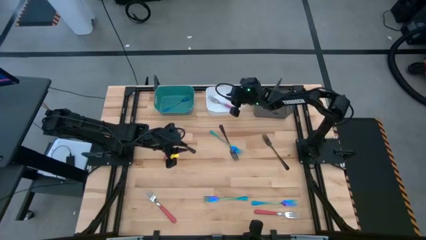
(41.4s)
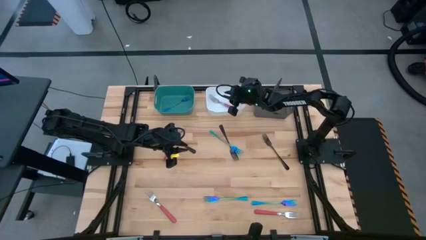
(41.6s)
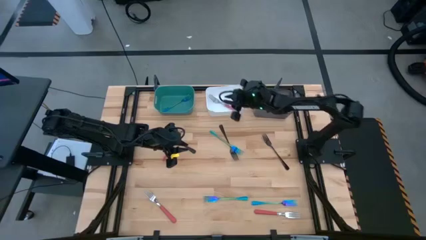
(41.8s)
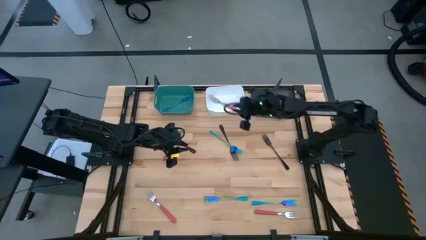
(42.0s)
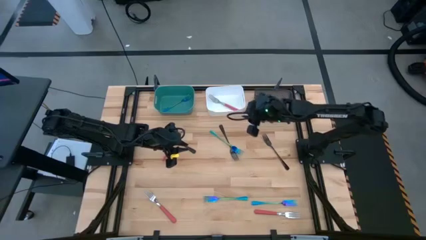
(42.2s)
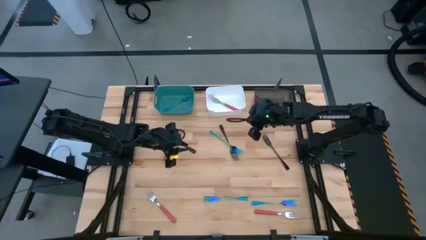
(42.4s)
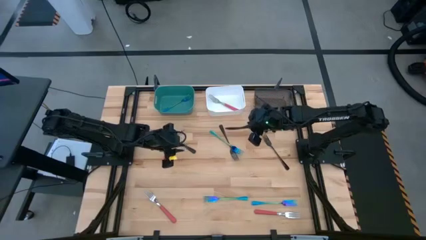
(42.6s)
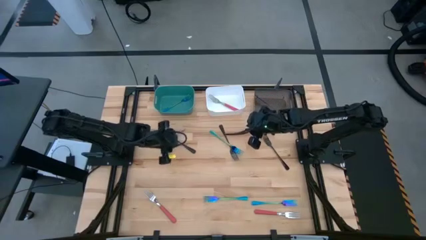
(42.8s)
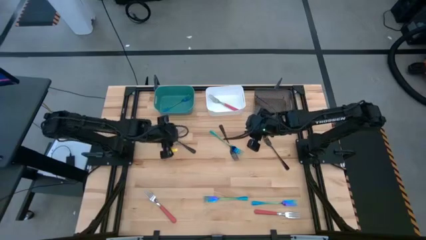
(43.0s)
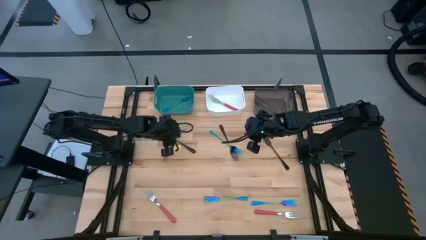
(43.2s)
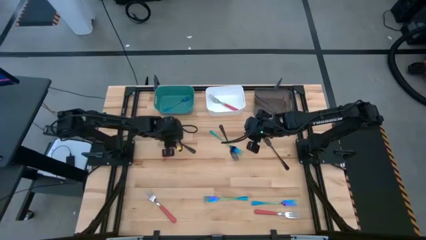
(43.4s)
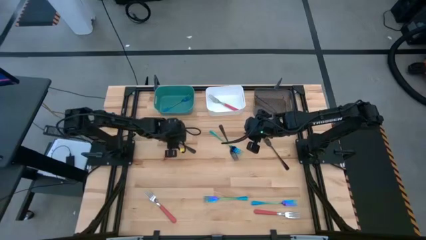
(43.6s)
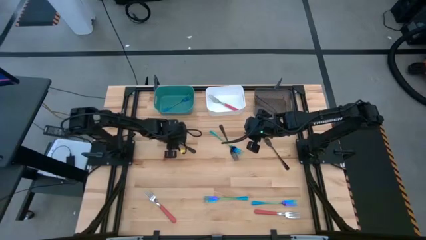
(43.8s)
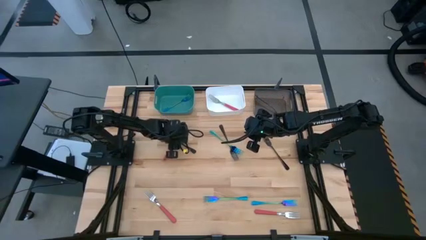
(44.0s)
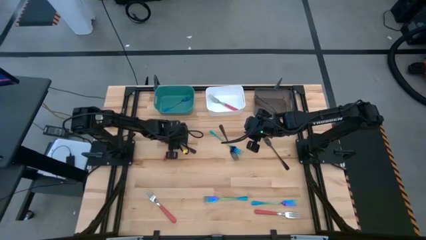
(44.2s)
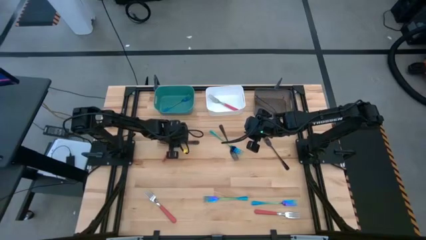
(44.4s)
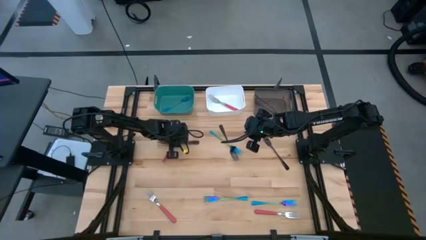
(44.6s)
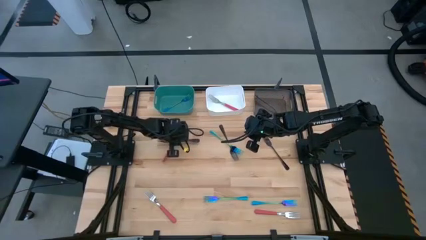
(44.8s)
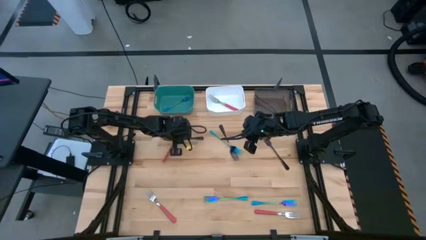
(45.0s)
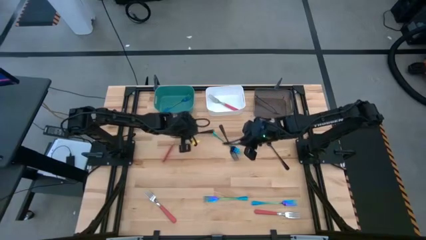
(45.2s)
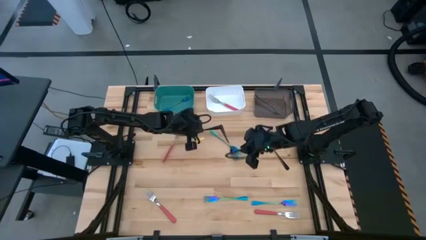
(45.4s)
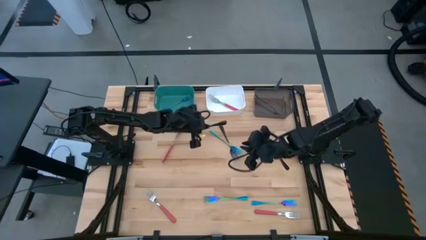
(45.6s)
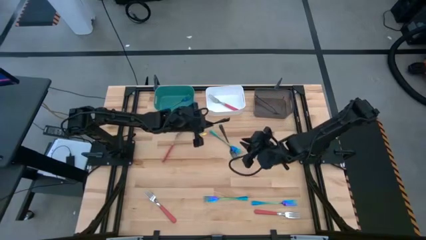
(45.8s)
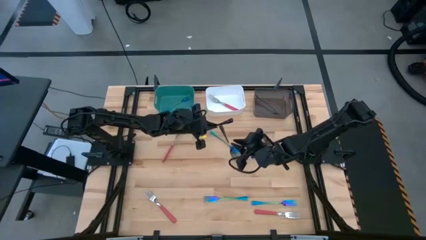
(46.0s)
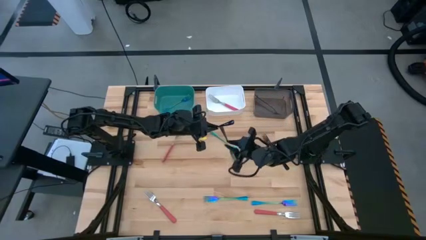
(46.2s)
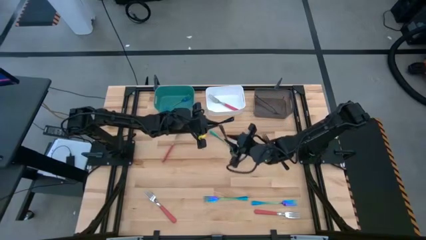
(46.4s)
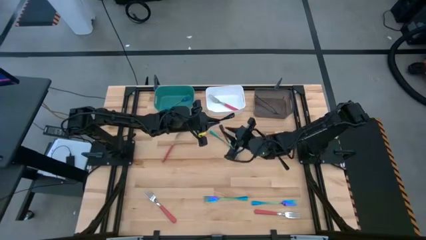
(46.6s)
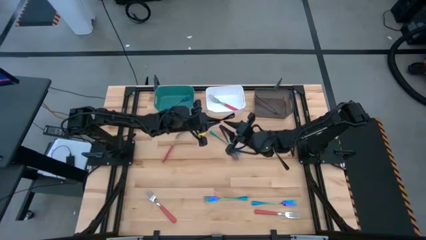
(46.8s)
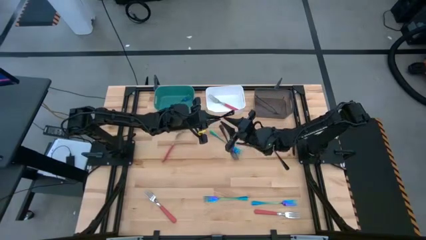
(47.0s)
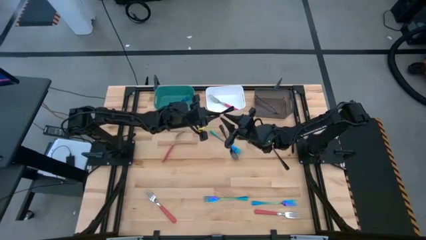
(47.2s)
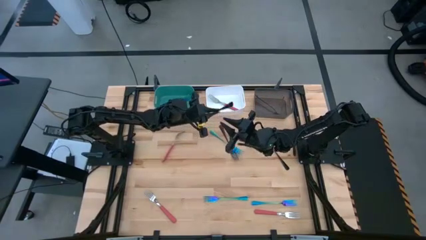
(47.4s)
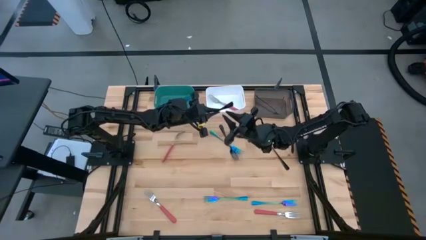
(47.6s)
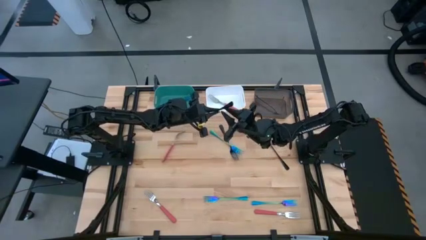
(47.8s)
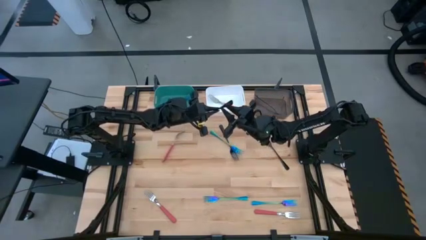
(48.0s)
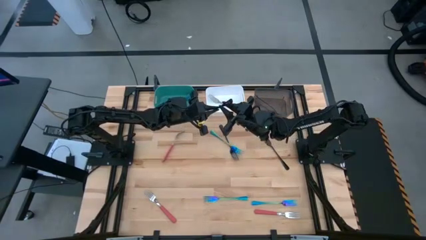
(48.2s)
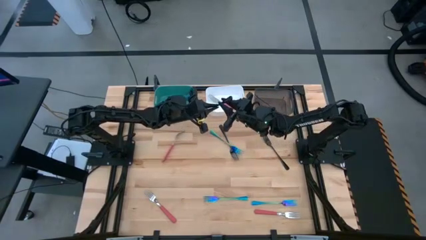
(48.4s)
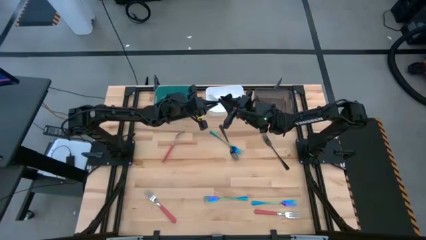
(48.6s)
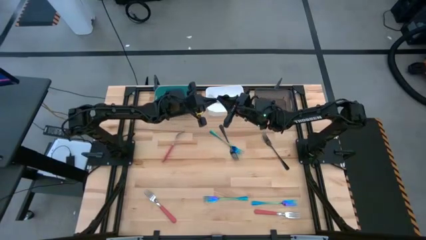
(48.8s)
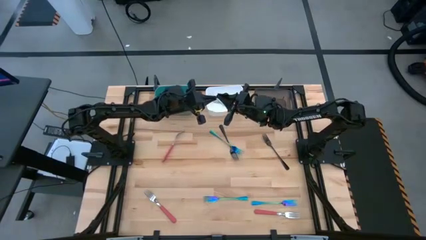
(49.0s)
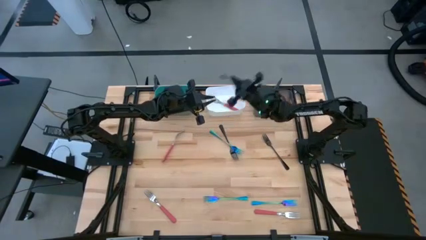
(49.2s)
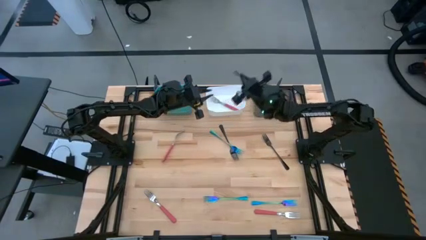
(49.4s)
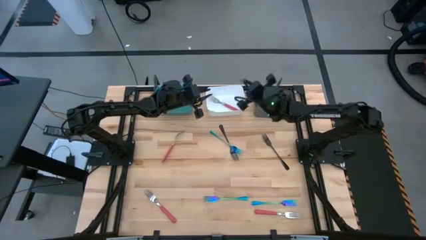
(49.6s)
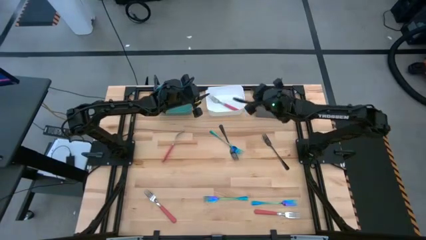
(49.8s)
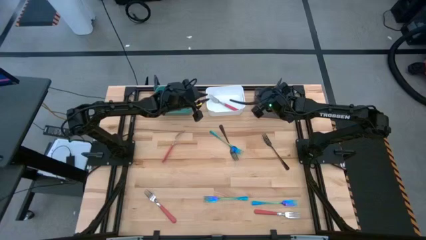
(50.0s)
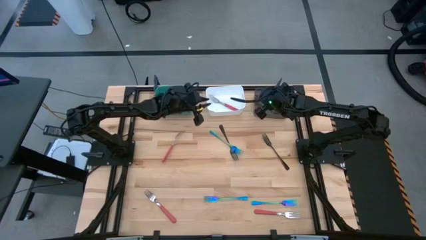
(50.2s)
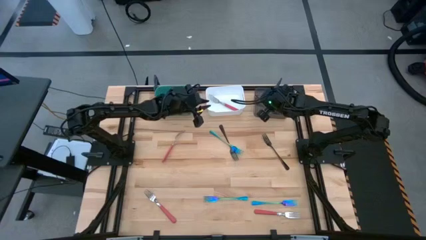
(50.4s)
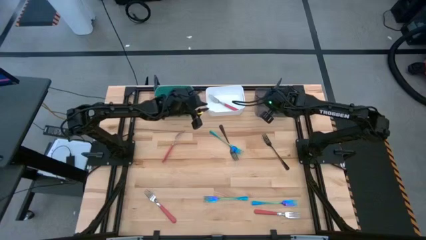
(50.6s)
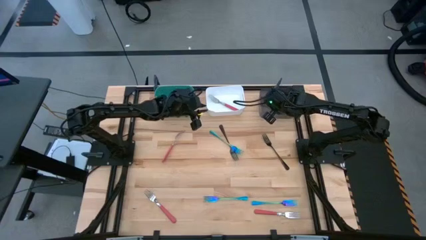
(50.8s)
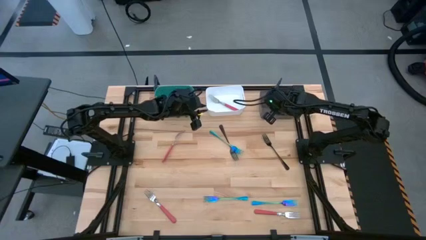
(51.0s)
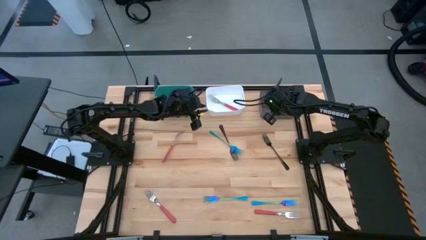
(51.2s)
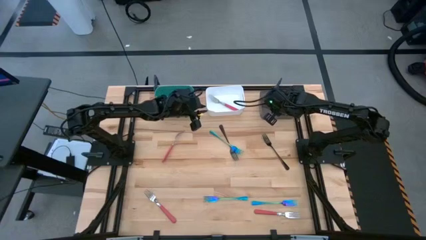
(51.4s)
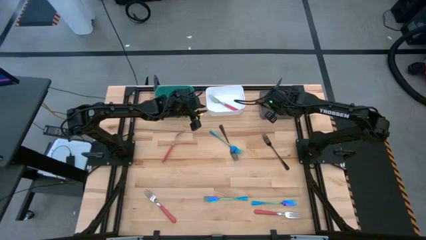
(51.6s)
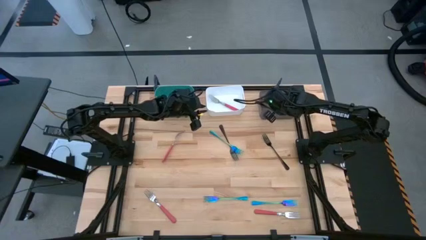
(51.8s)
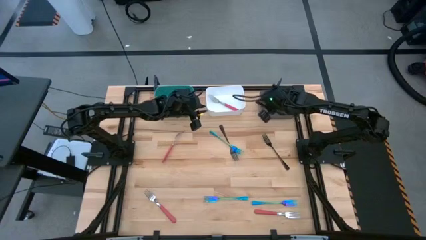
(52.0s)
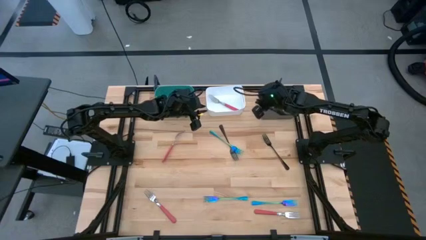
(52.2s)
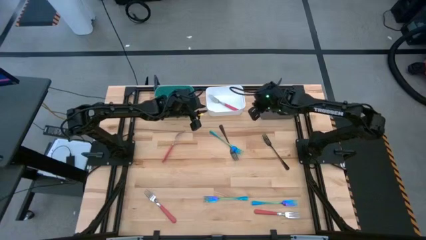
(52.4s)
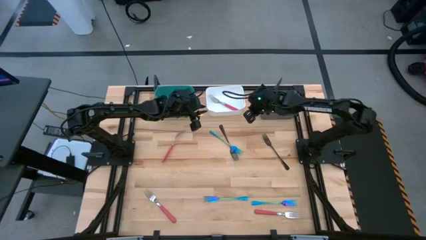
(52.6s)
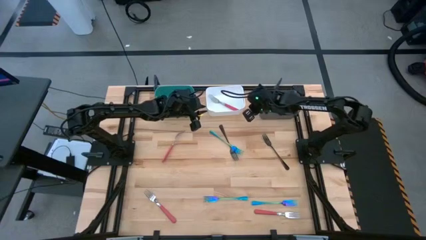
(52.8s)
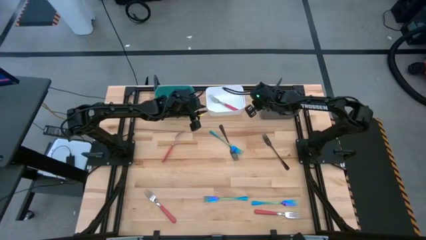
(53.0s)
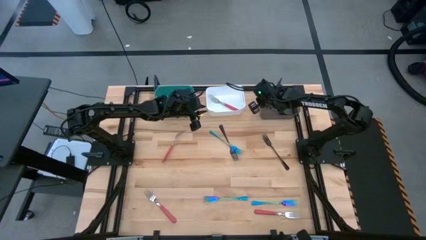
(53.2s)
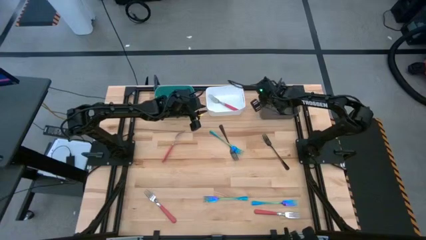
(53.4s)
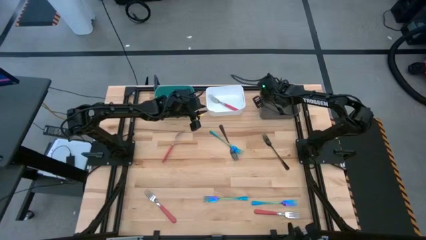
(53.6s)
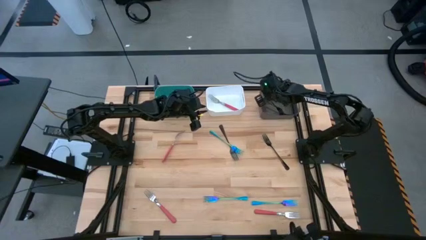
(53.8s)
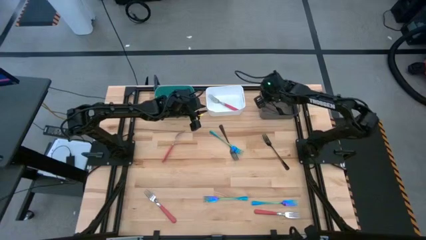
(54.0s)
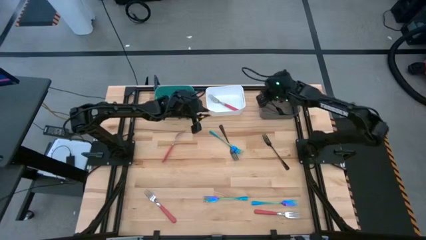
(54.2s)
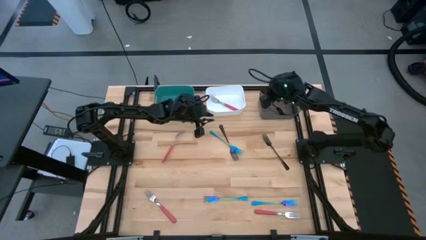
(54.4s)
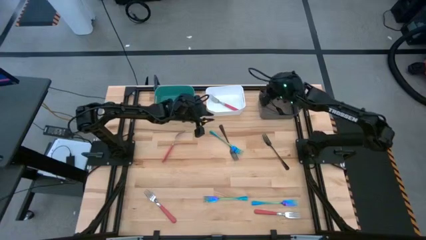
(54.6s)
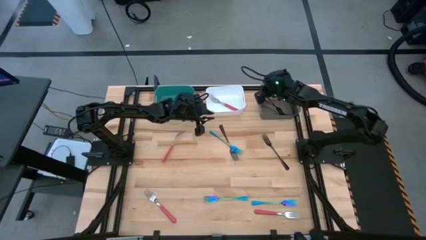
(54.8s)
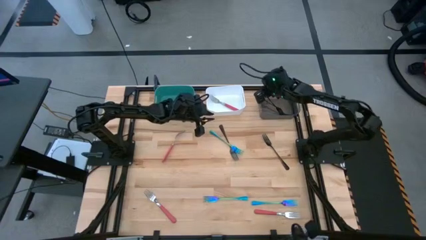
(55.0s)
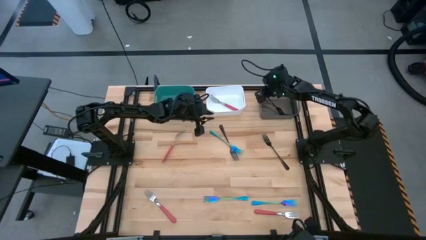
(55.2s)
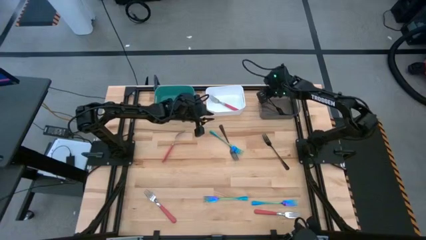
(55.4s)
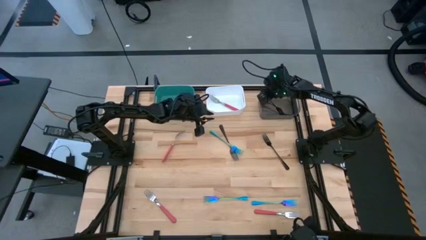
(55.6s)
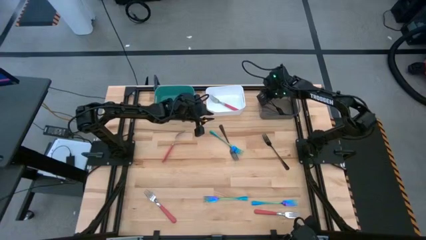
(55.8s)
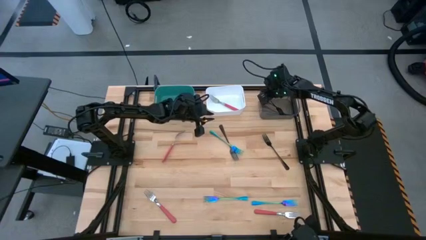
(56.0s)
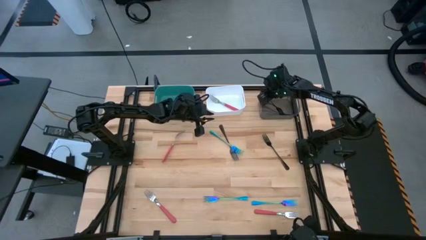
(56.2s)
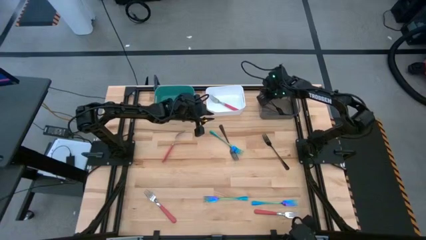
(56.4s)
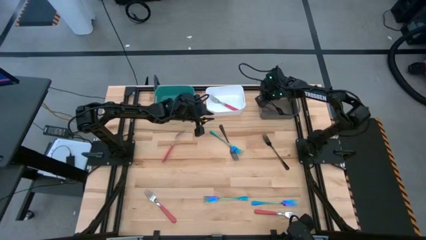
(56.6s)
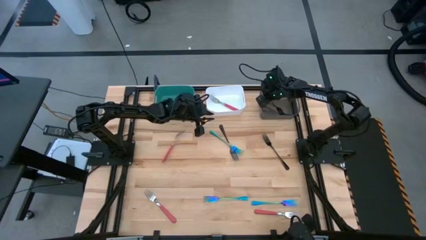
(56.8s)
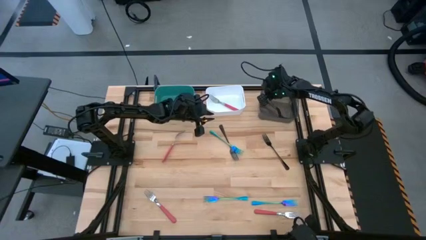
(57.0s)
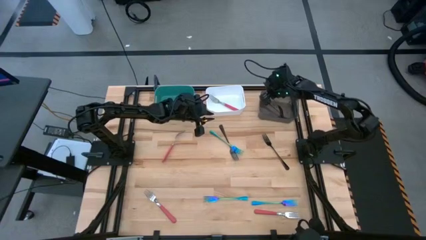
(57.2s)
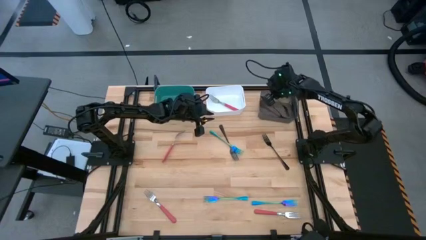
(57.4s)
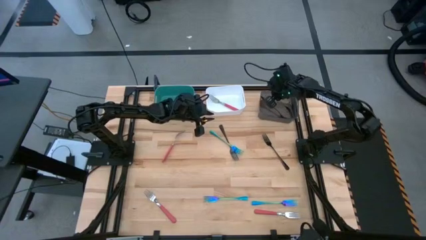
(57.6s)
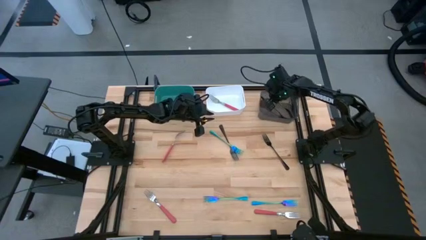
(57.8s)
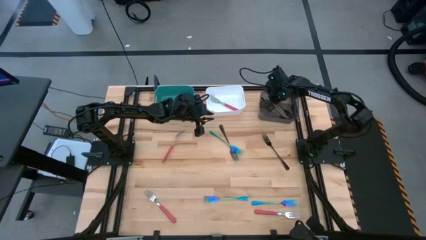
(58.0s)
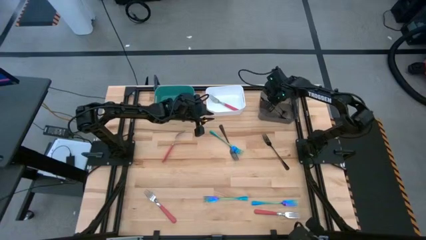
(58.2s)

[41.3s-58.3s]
Task: Sort silverware by color (type)
Put the black fork into the black bin
